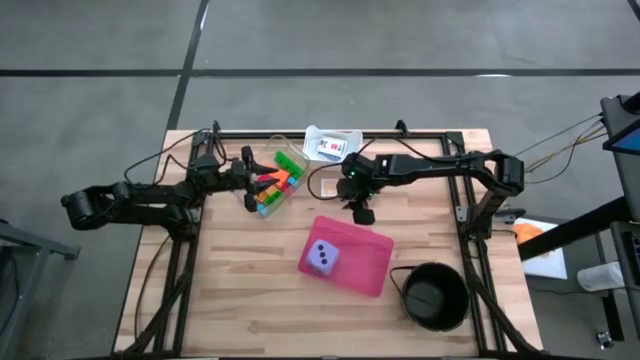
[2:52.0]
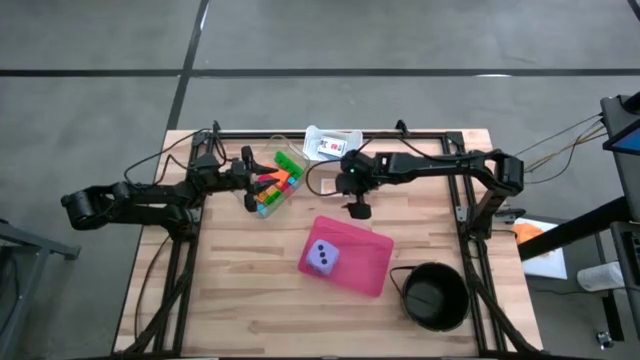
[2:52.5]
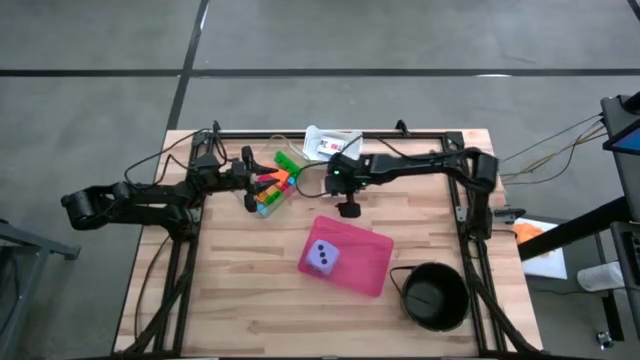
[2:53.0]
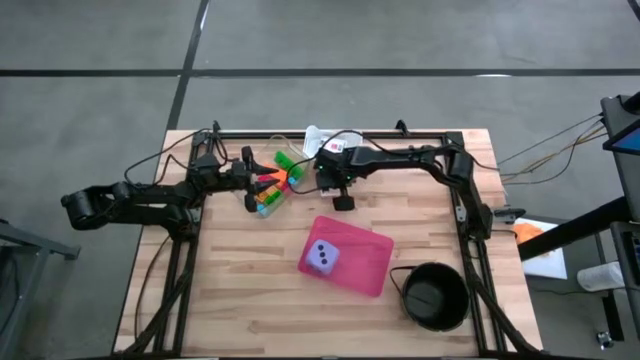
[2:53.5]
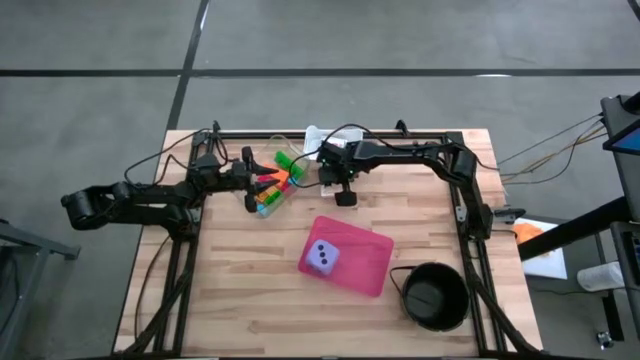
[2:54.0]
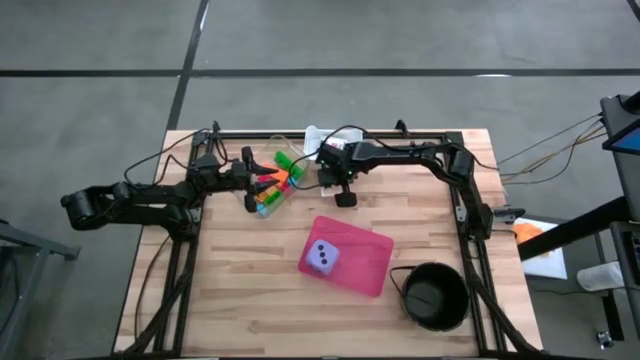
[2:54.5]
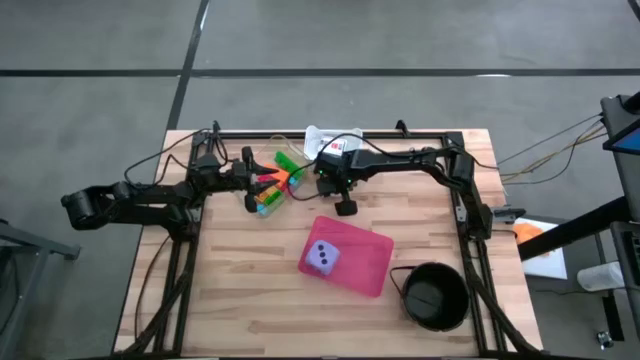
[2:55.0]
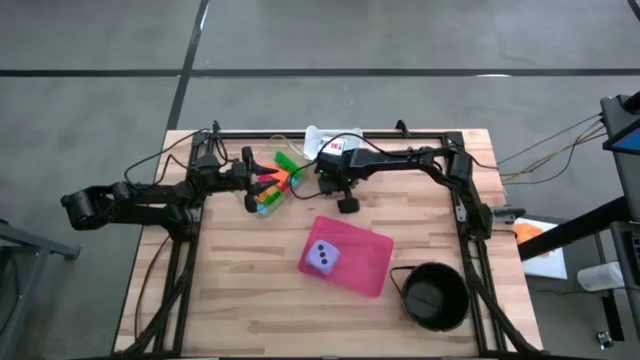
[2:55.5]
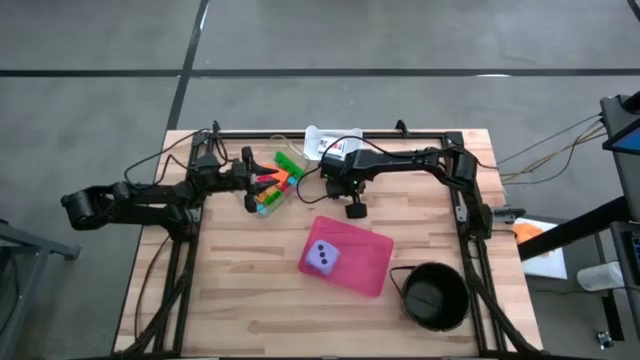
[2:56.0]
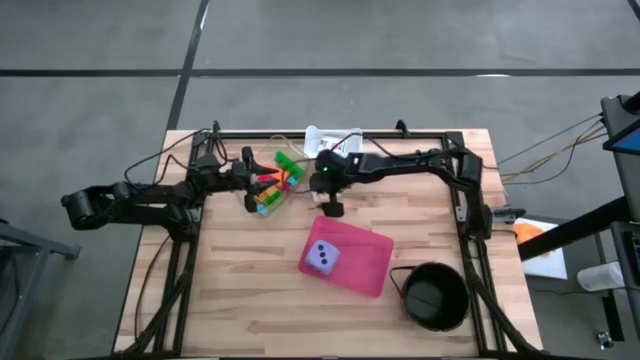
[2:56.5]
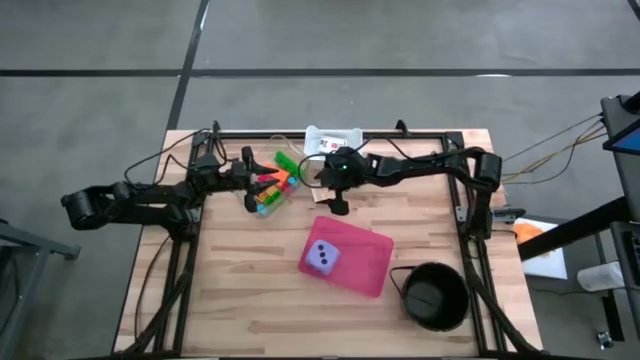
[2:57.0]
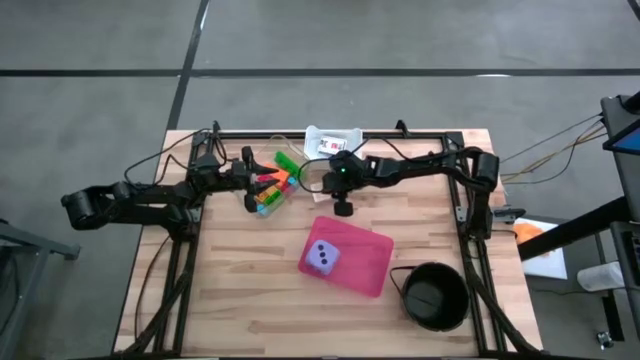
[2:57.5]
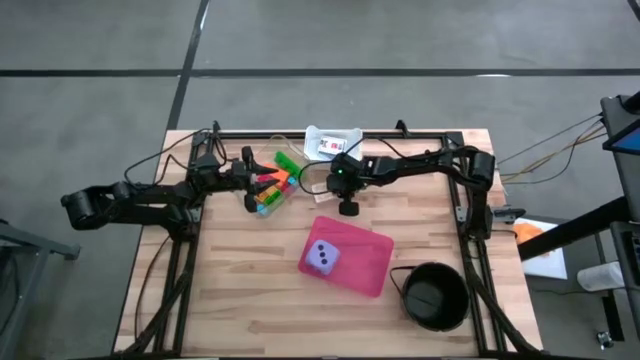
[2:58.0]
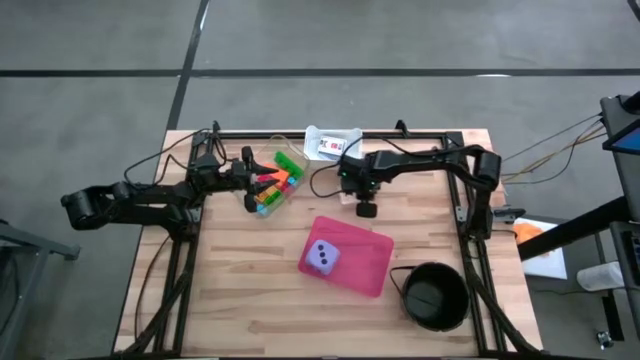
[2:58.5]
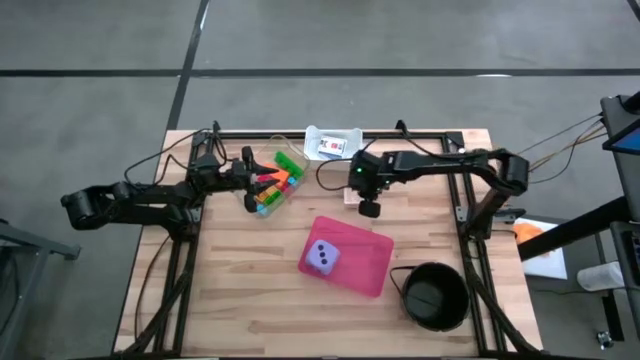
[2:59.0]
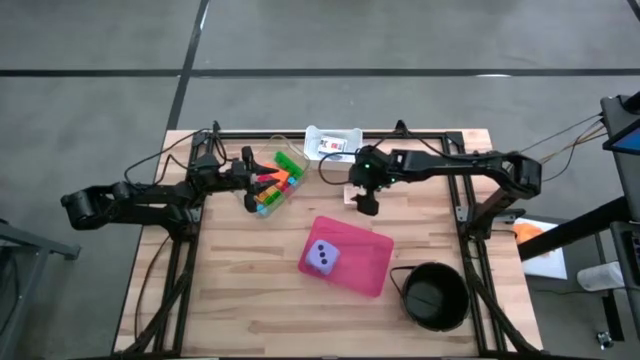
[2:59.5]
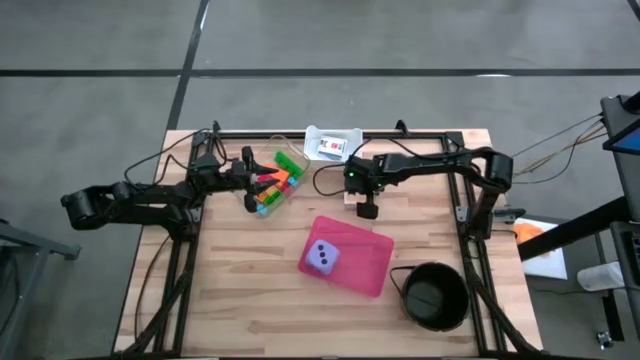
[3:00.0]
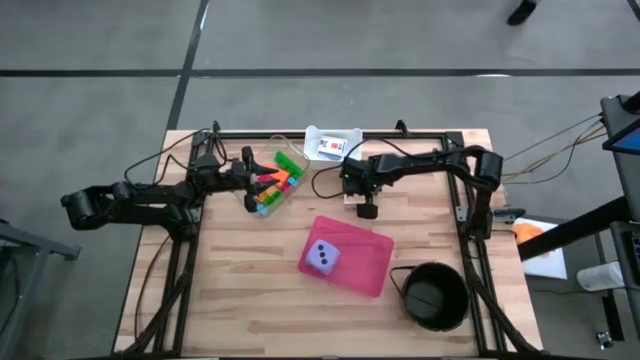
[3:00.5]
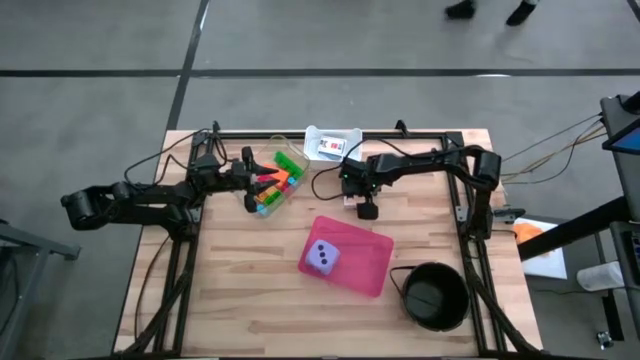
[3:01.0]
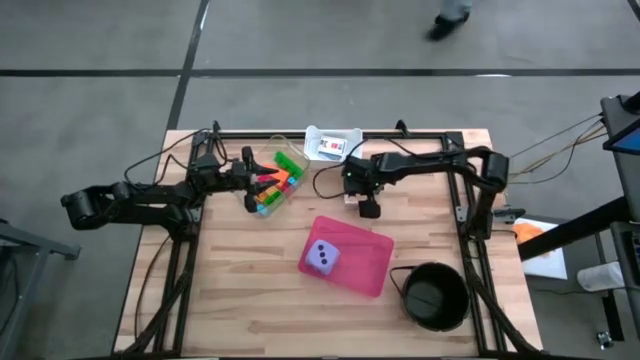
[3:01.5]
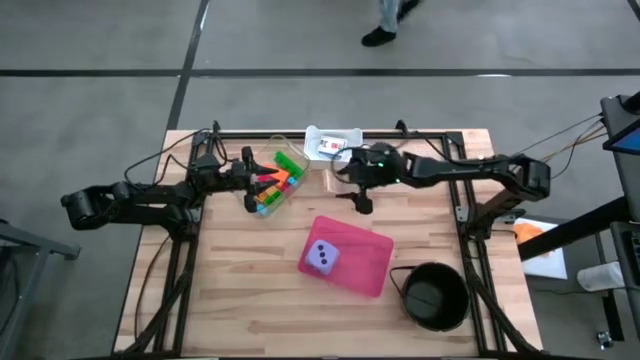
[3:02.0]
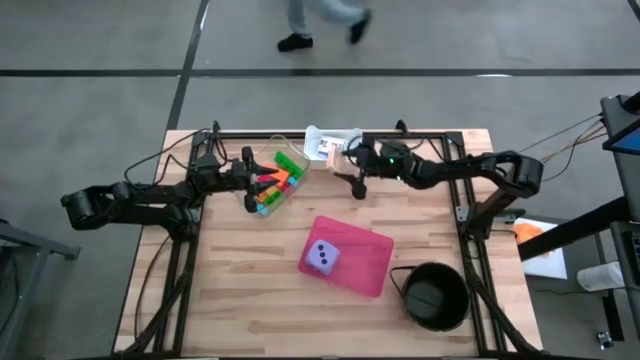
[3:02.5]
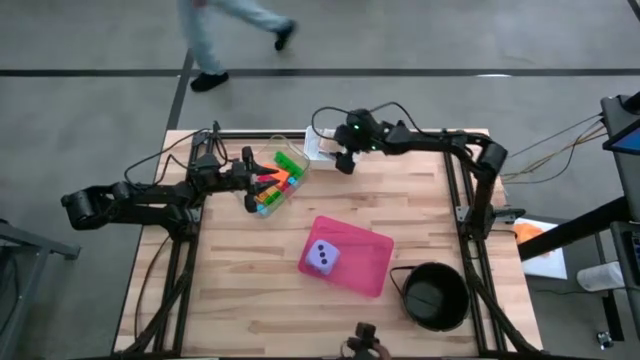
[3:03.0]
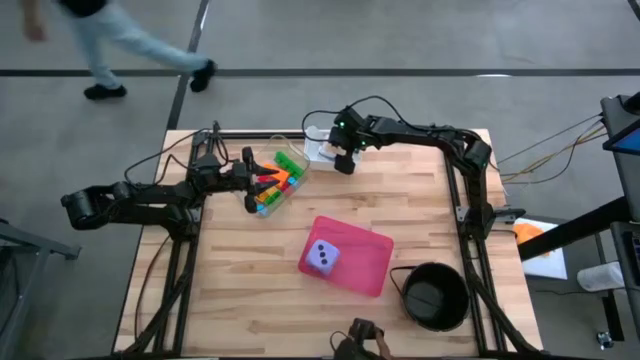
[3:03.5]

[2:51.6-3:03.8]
Task: Pick & Place Toys
Put the yellow playing card into the white bin

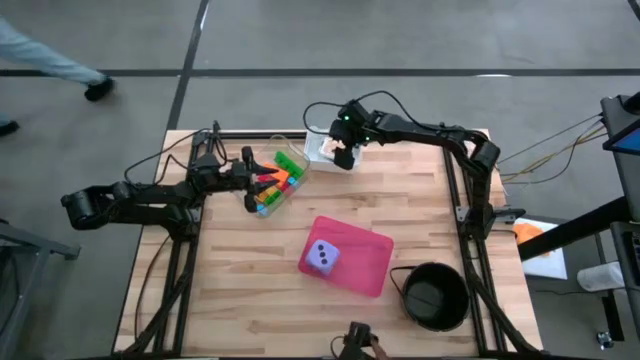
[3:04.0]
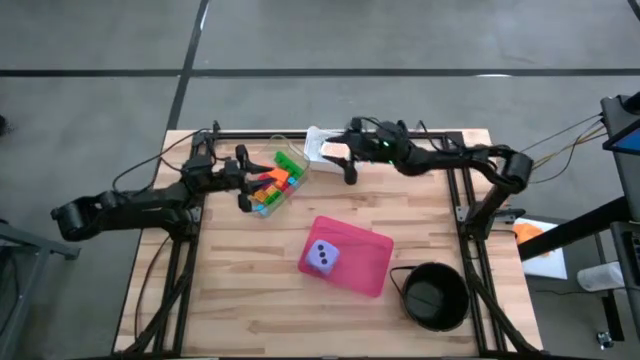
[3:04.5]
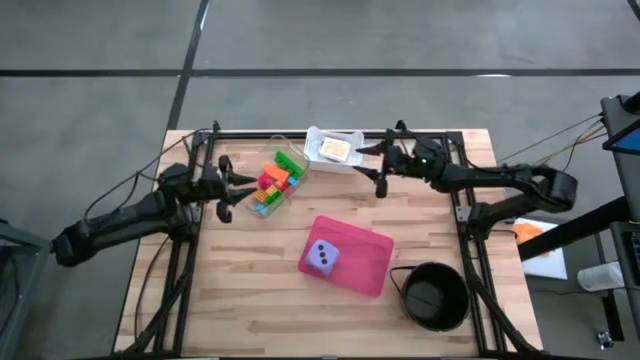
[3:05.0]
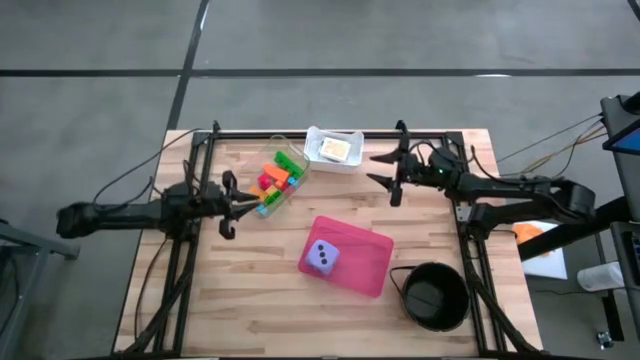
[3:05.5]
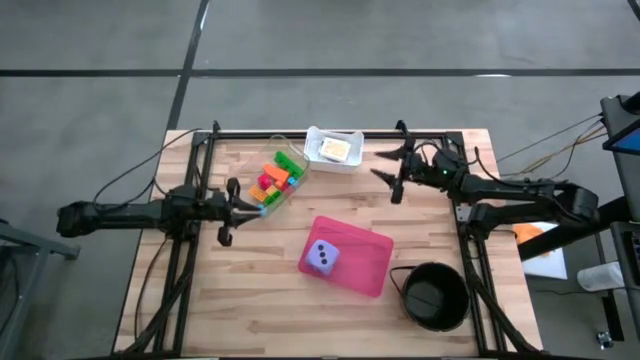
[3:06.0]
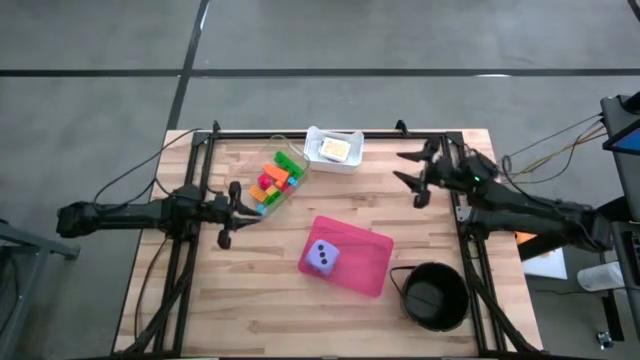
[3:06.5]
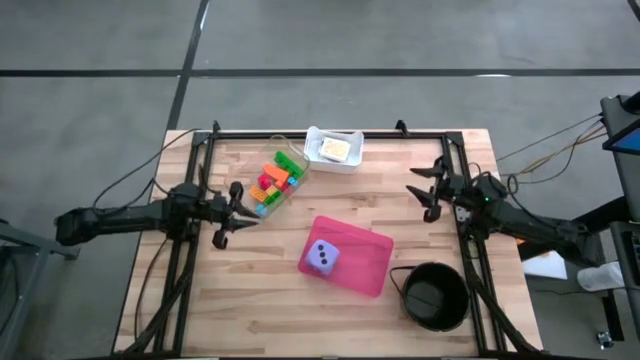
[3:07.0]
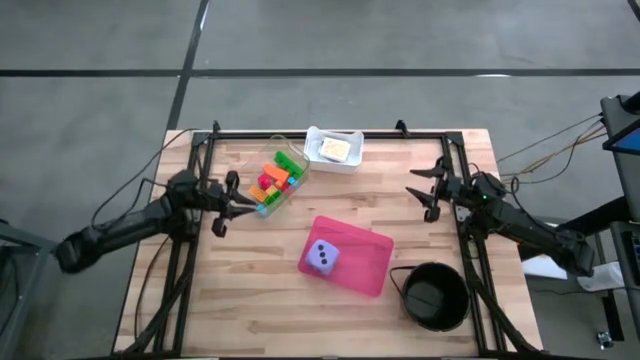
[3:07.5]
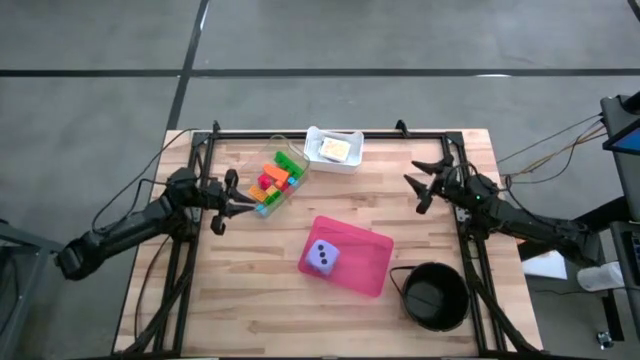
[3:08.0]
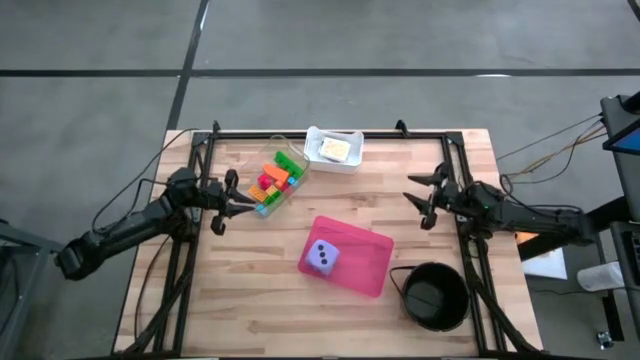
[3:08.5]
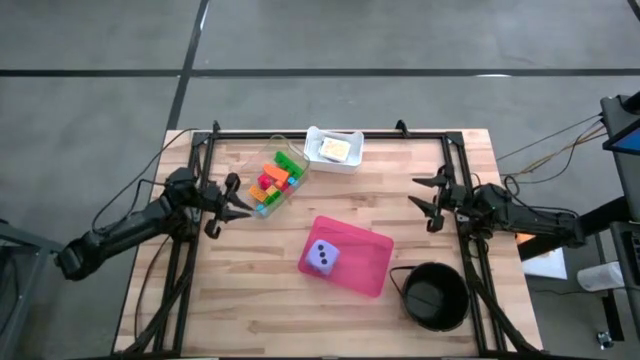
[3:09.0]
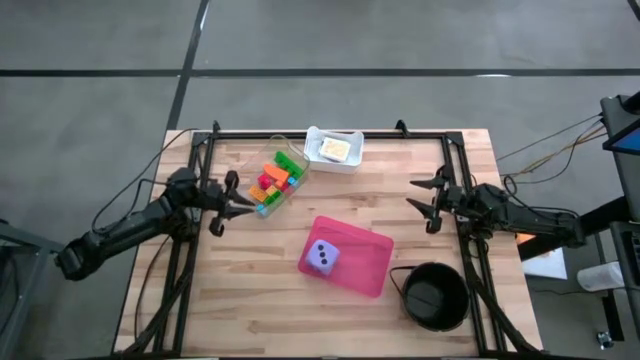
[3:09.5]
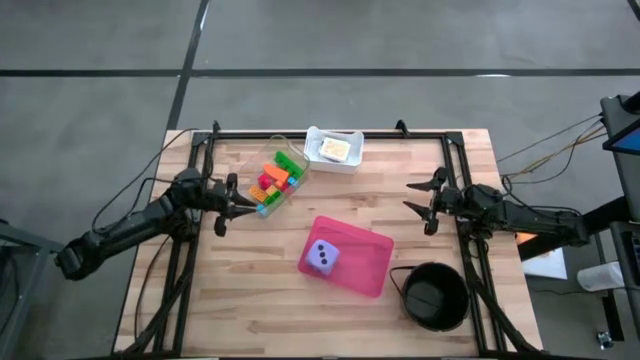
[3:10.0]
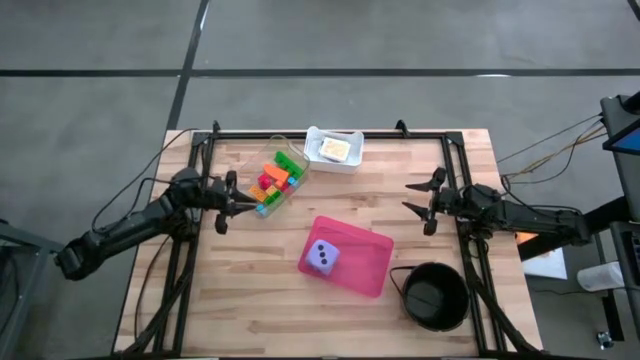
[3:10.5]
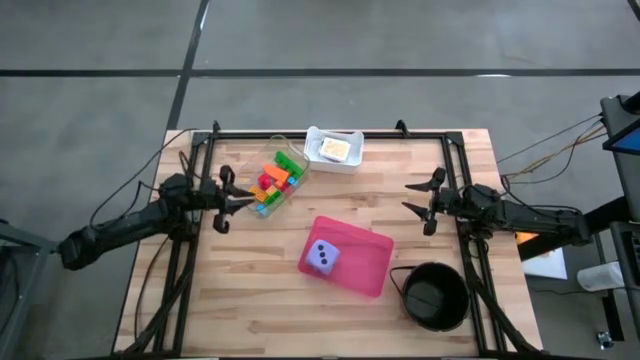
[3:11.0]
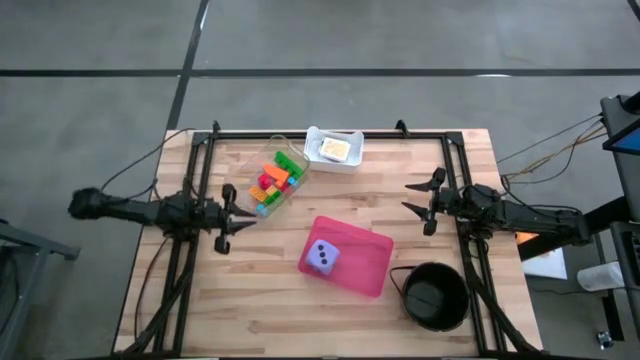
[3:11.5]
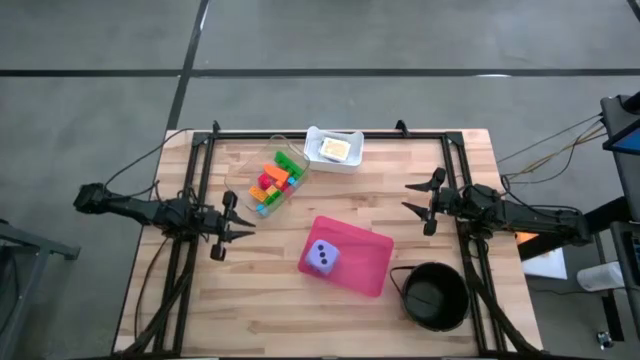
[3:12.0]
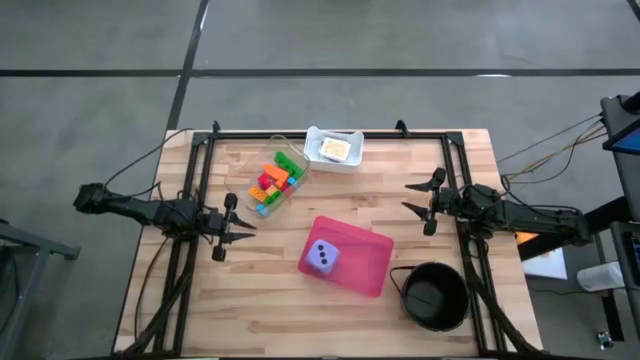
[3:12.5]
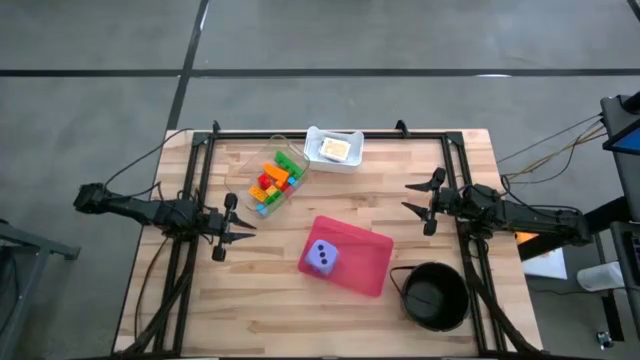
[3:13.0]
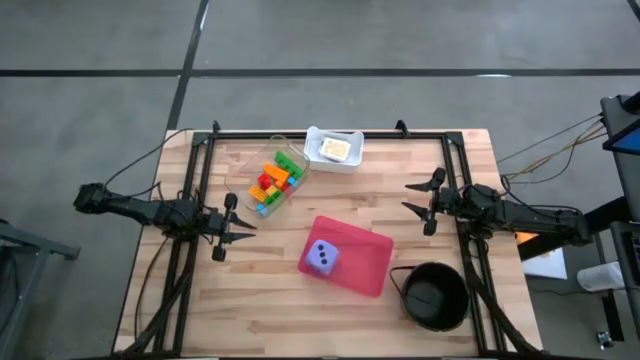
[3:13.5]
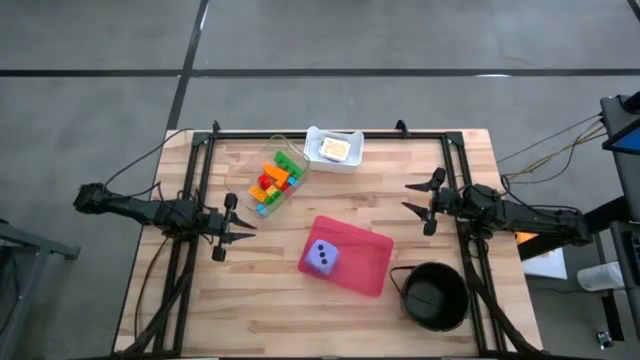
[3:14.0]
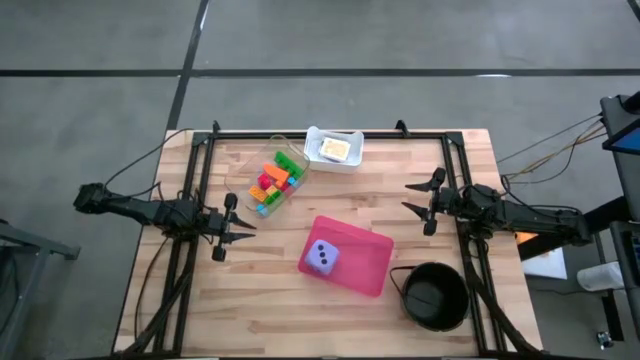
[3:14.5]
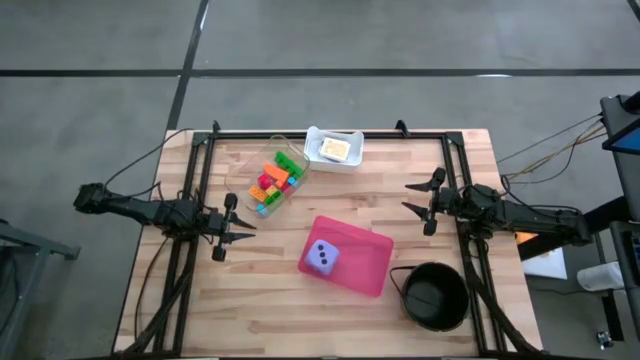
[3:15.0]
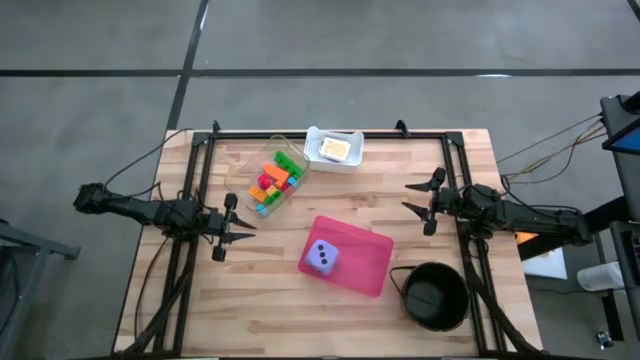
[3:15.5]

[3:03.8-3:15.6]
Return to Home Position
